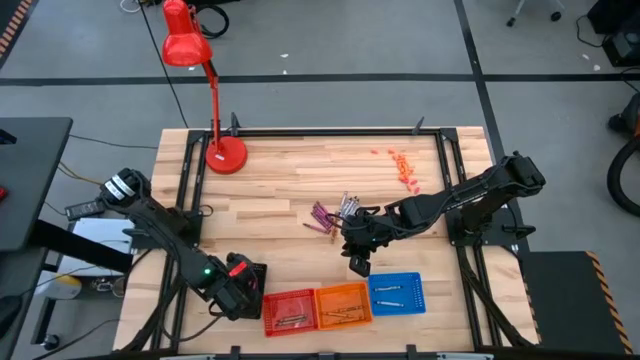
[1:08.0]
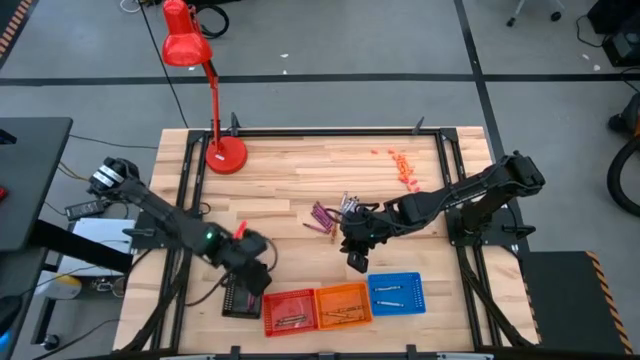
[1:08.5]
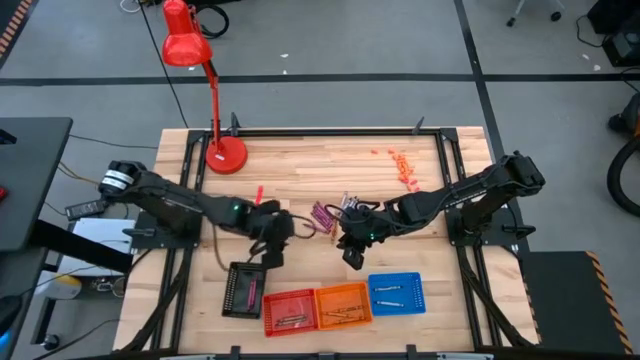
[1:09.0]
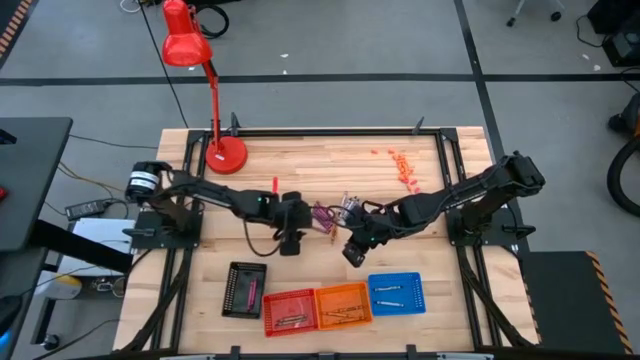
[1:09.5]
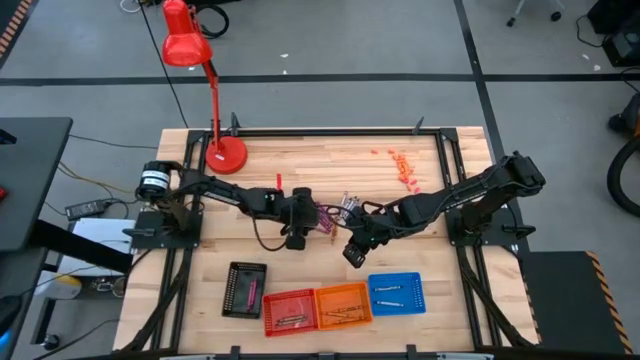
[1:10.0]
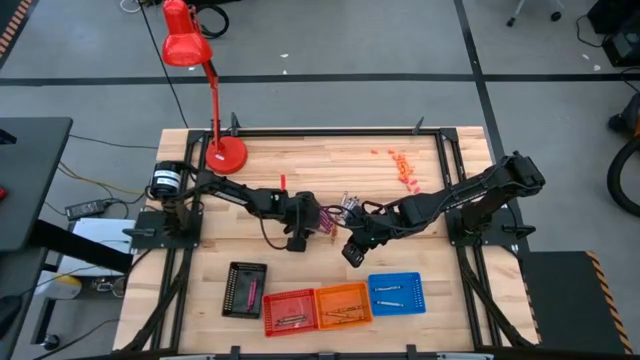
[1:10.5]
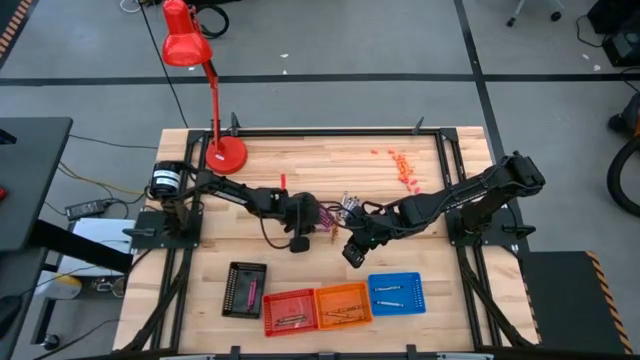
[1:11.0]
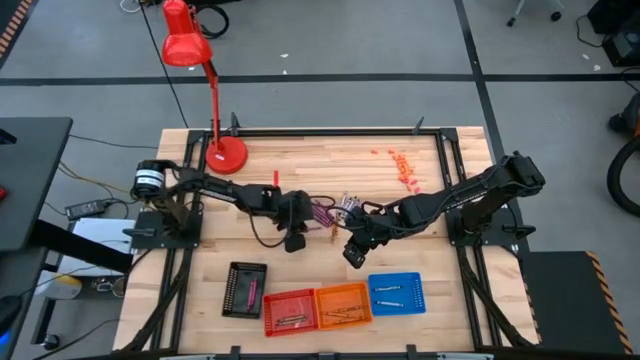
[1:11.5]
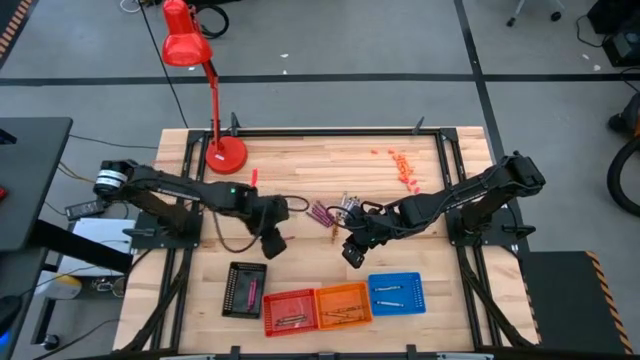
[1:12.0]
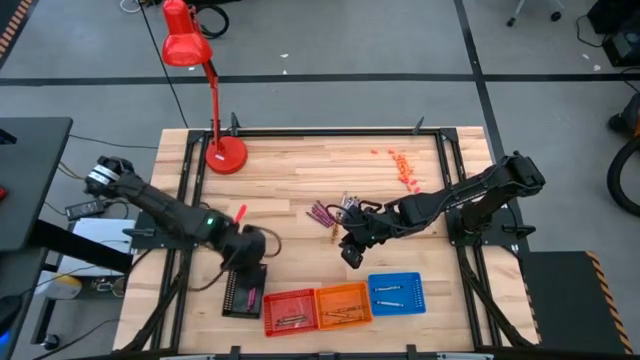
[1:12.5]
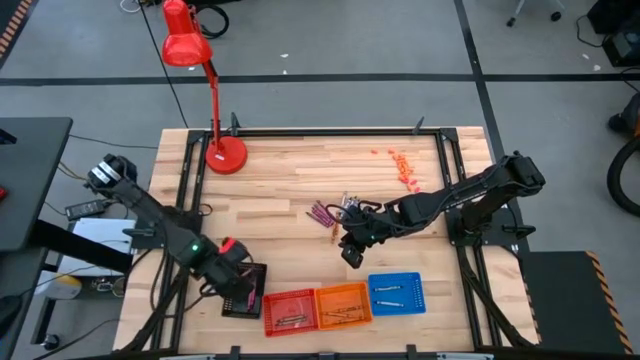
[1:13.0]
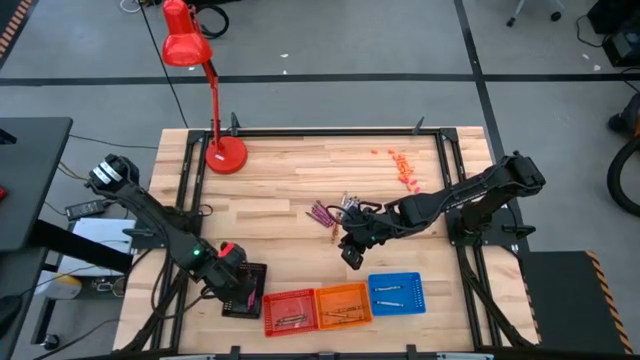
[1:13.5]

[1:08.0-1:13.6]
Task: Sort crayons
Put the violet crayon into the black bin

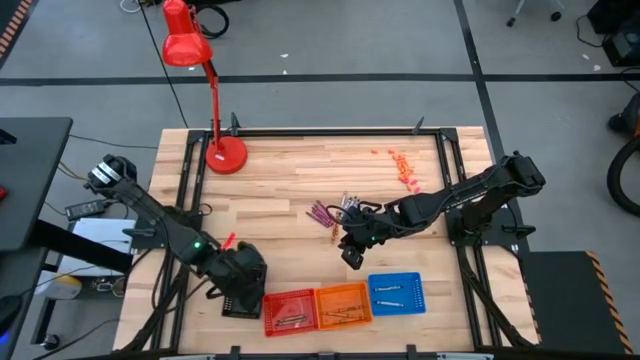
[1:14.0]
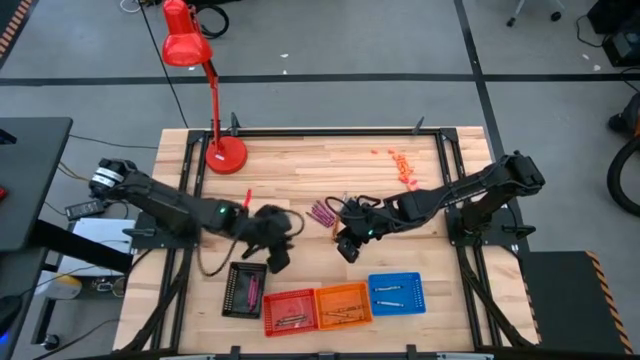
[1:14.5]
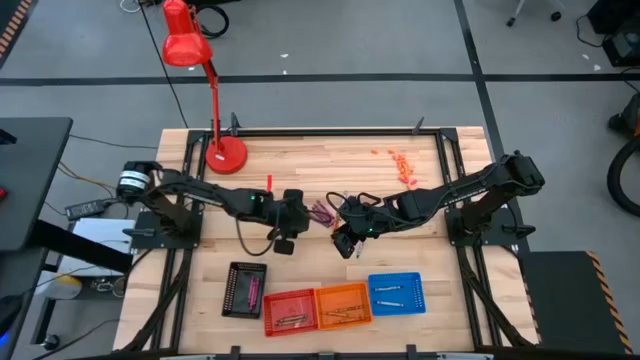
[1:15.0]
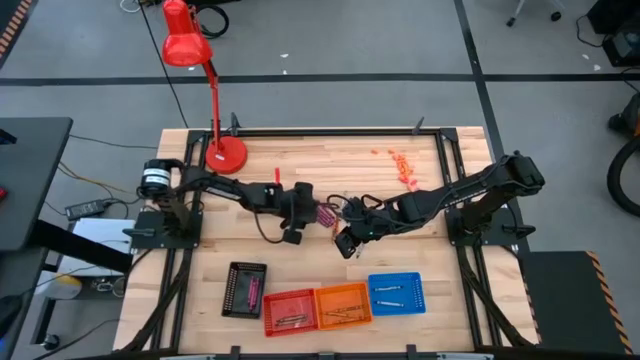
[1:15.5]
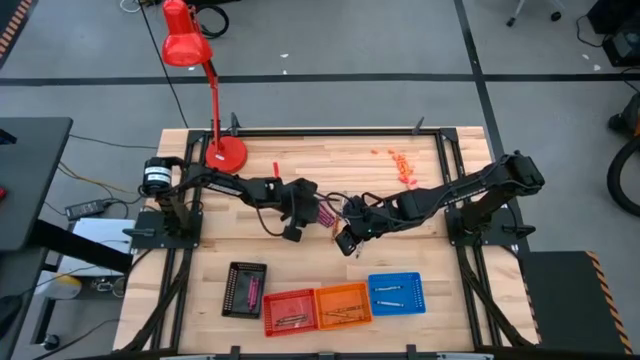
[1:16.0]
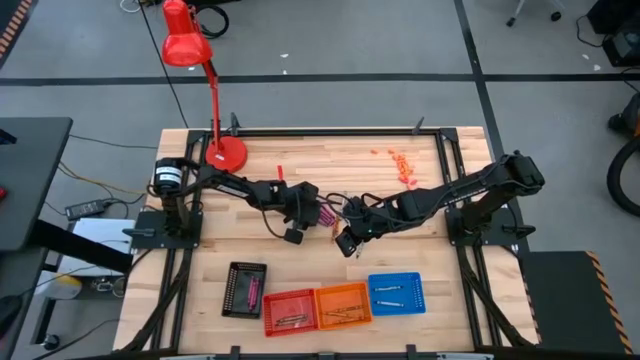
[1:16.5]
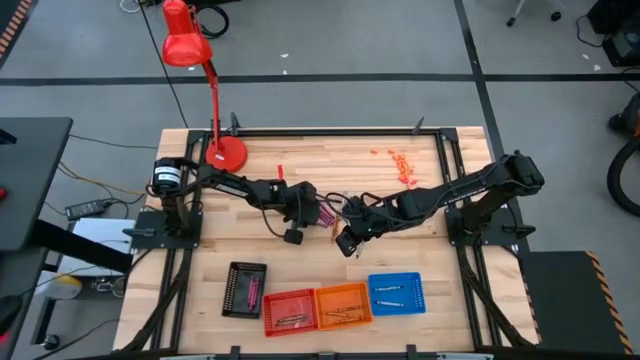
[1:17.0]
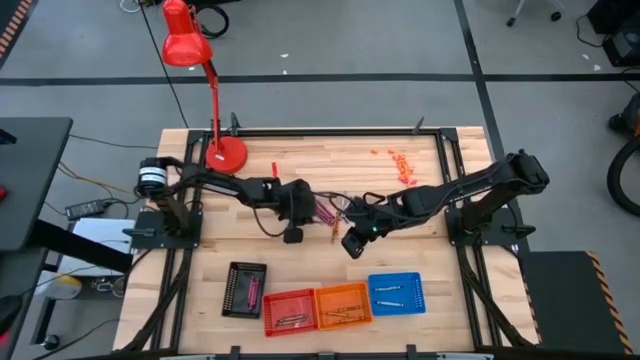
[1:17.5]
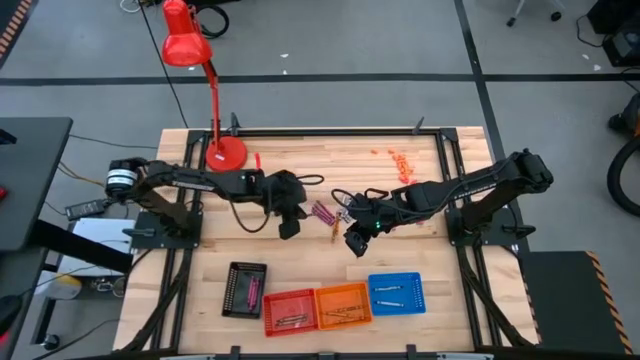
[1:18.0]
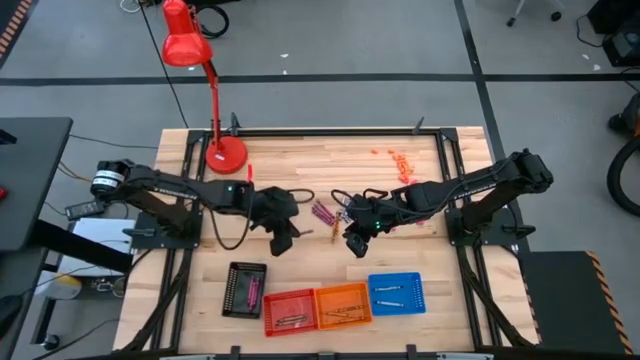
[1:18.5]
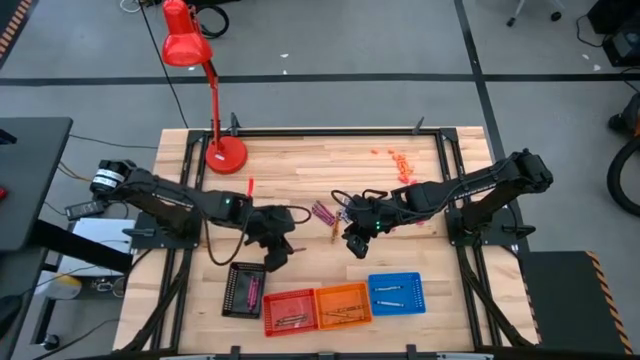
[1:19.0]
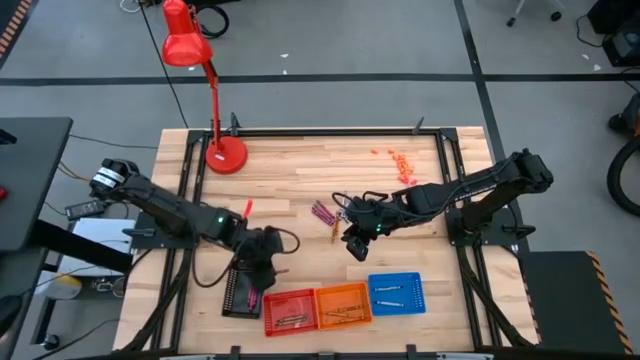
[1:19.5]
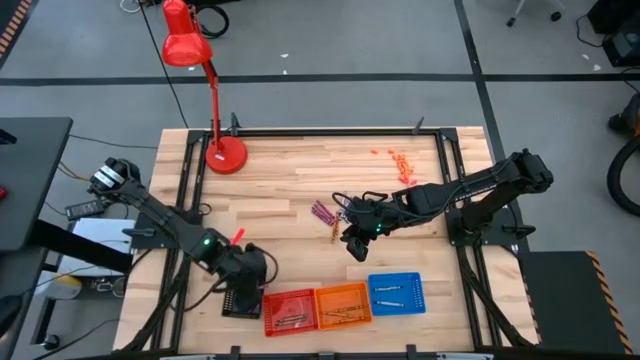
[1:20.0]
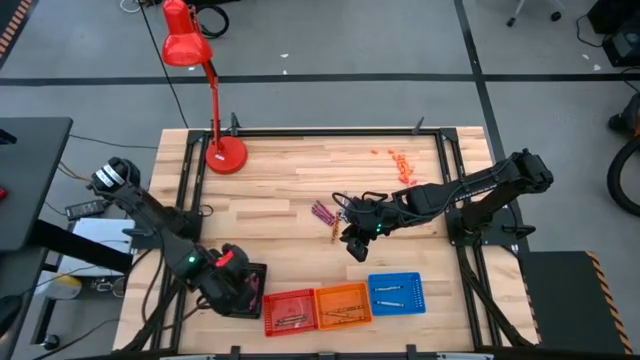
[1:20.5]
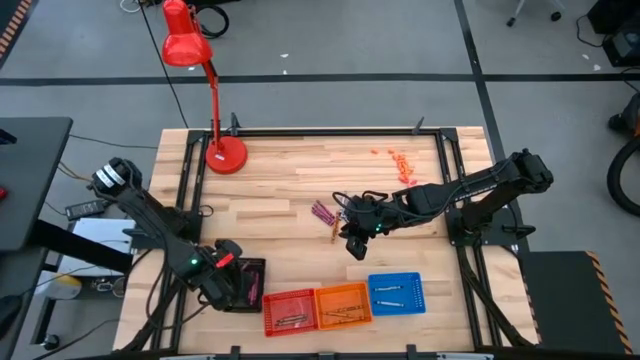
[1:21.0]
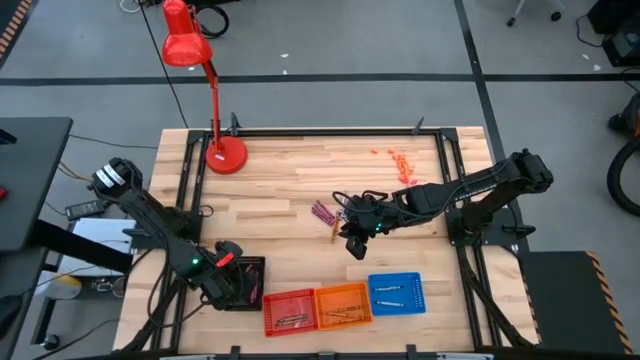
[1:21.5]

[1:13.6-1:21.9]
Put the violet crayon into the black bin

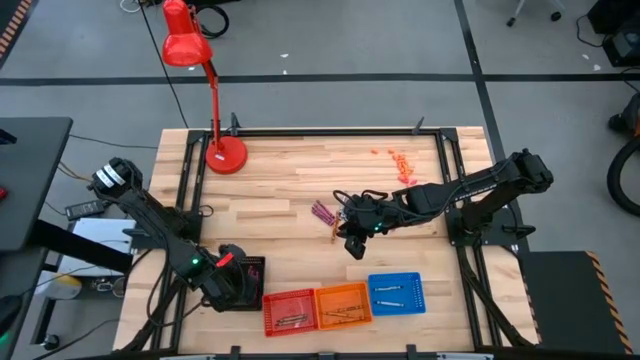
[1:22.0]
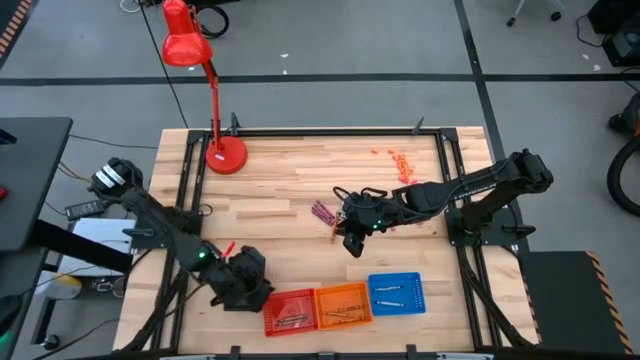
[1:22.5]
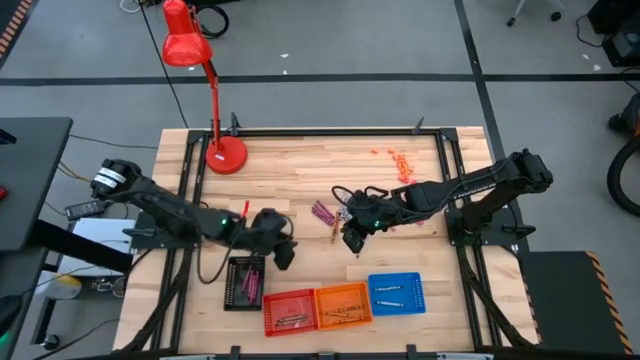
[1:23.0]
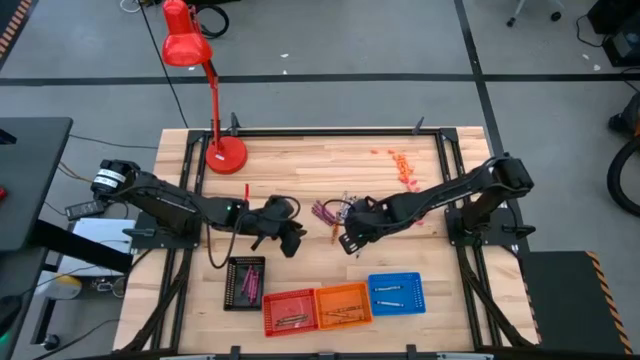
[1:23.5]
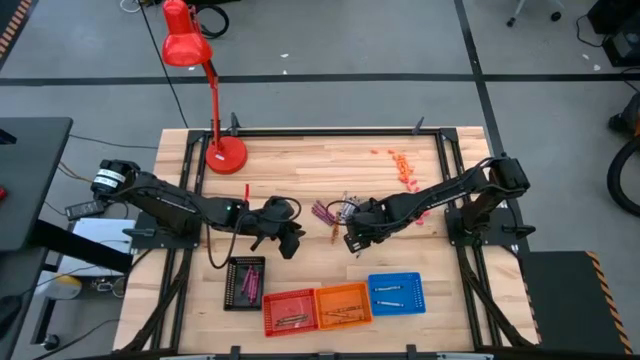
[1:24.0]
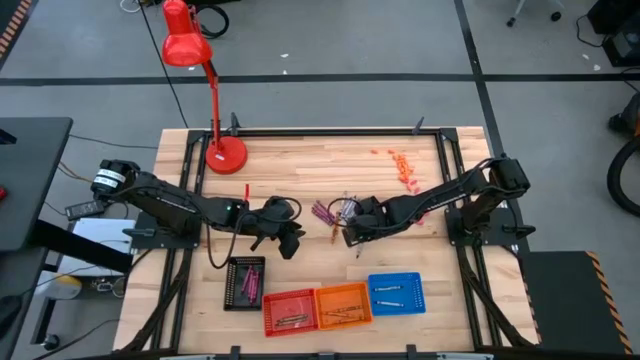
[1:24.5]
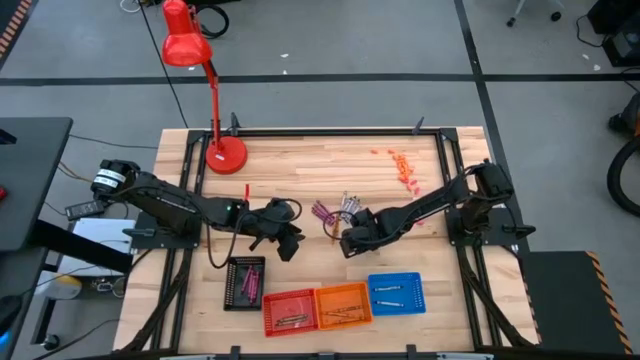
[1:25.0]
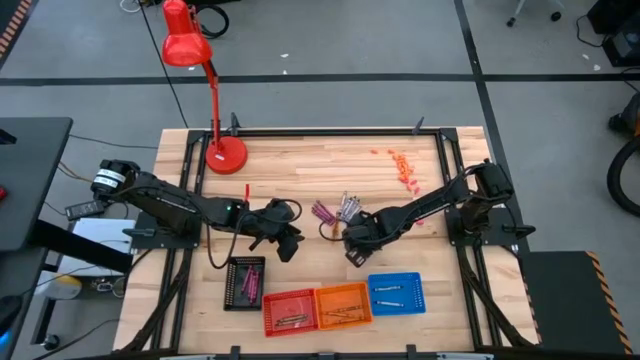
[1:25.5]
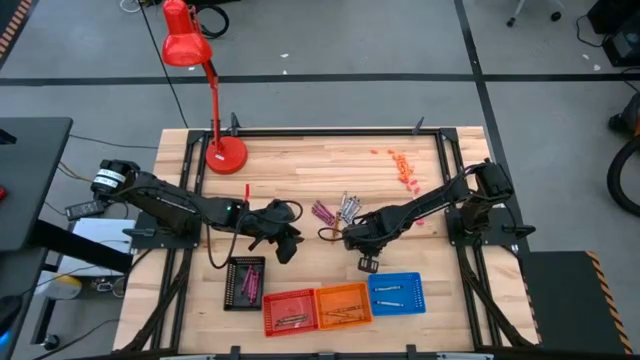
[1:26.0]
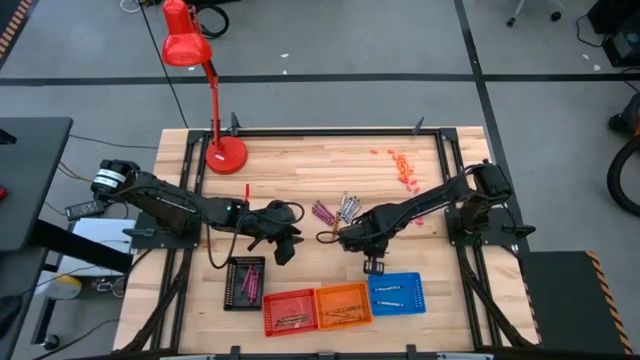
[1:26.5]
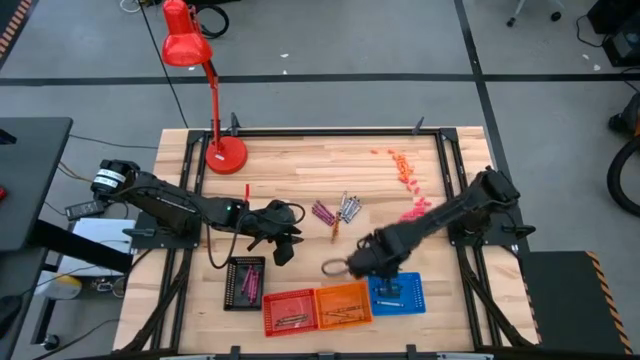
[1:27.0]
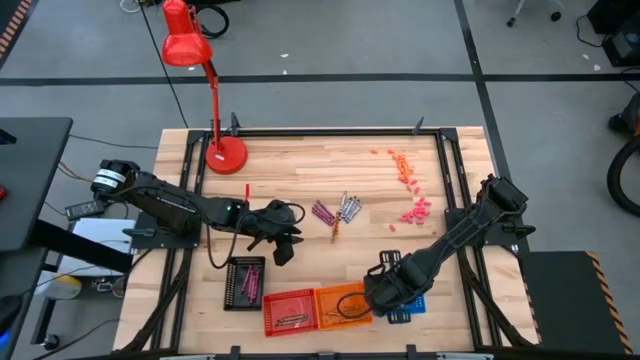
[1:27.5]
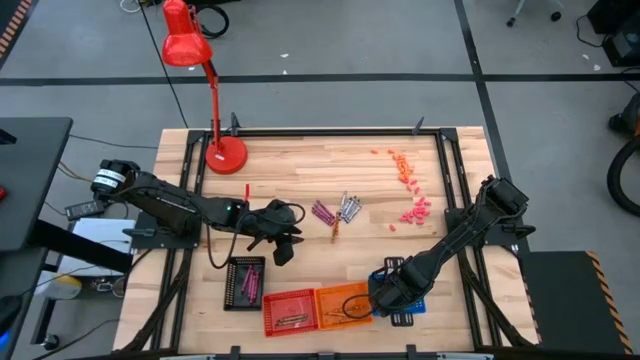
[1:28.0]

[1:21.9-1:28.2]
Put the black crayon into the blue bin

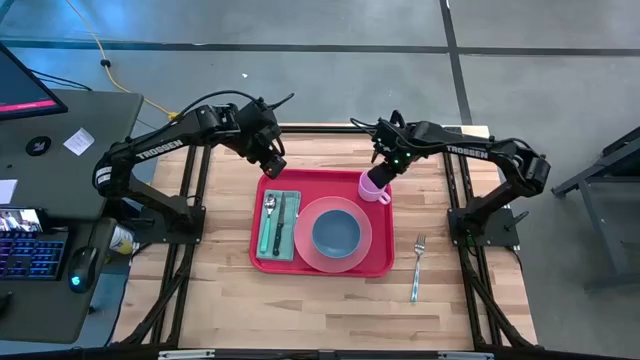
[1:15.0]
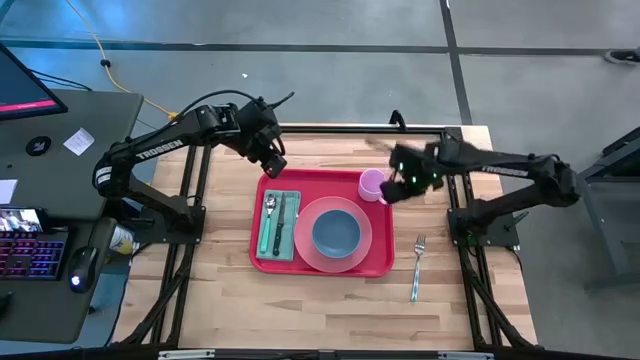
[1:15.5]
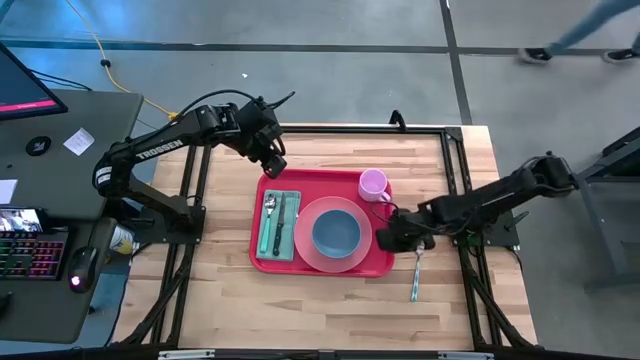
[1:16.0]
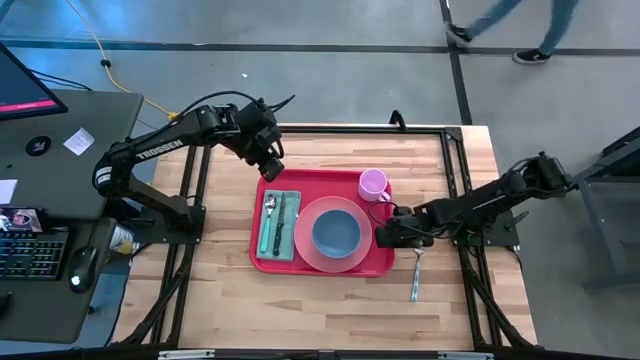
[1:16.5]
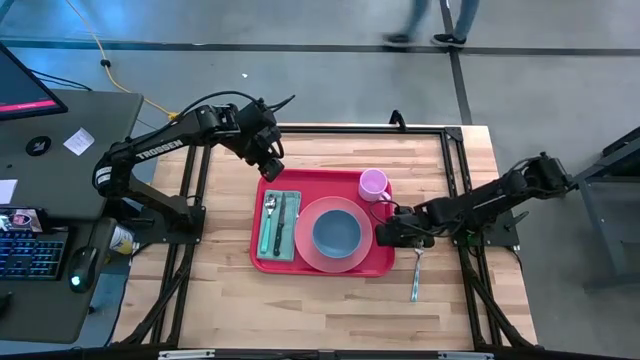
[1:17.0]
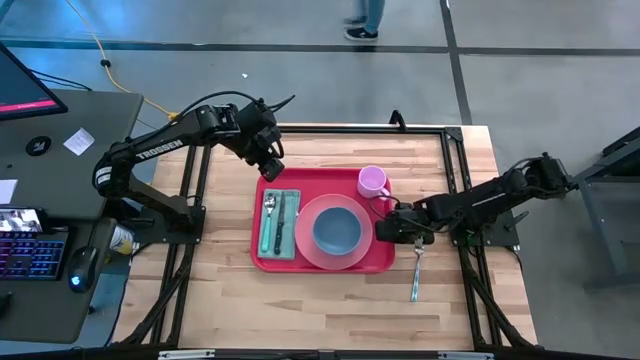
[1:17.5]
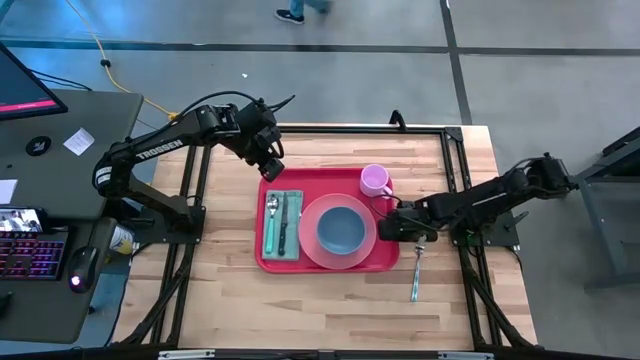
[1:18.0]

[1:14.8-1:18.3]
Task: Set up tray
Adjust the red tray
